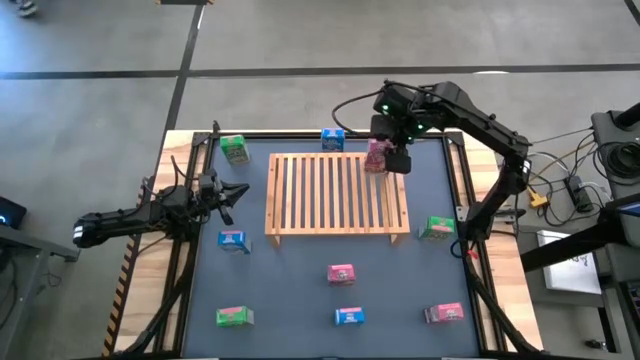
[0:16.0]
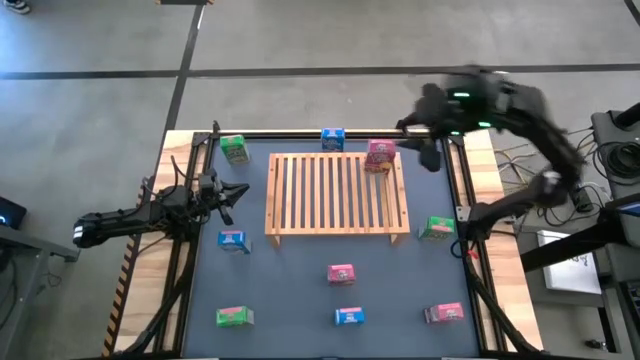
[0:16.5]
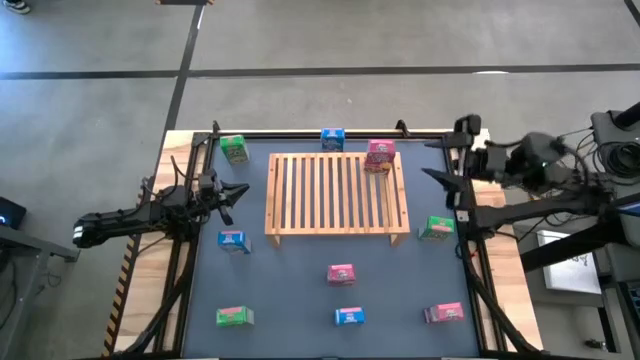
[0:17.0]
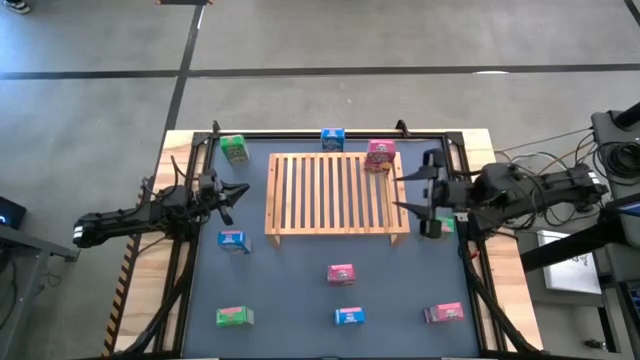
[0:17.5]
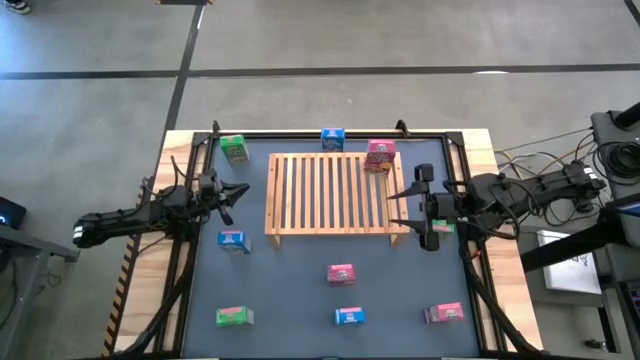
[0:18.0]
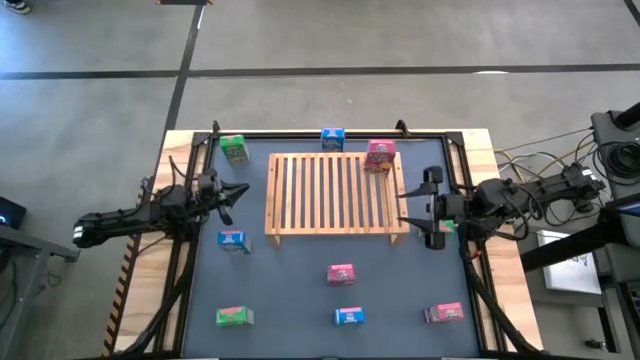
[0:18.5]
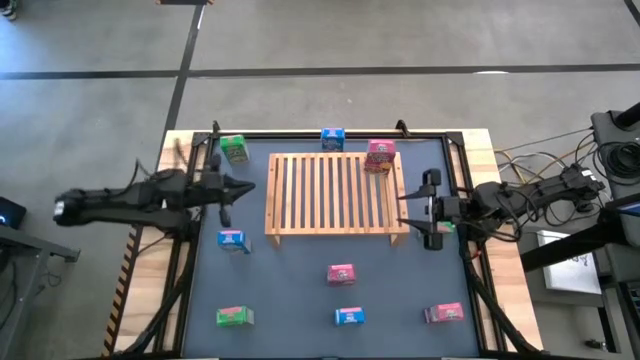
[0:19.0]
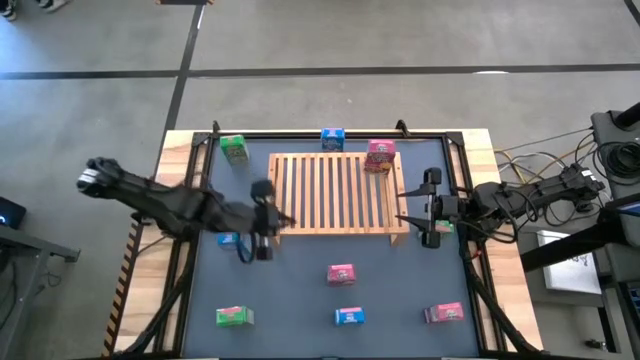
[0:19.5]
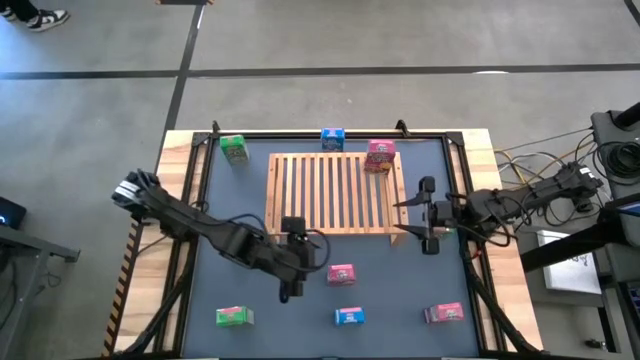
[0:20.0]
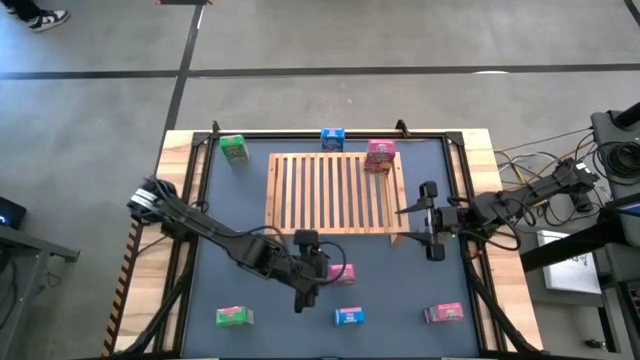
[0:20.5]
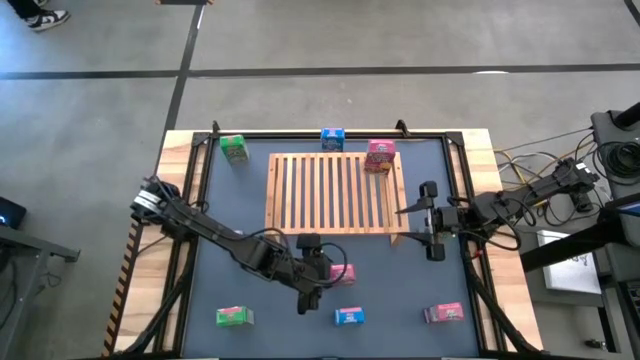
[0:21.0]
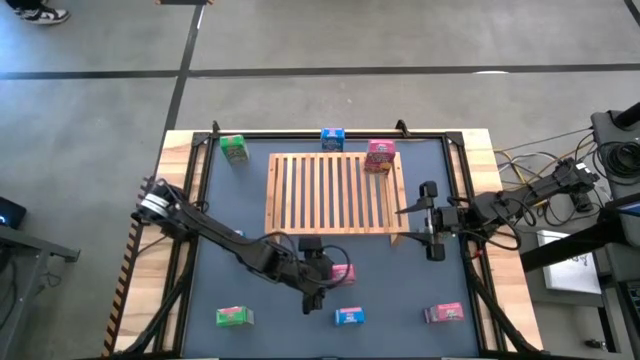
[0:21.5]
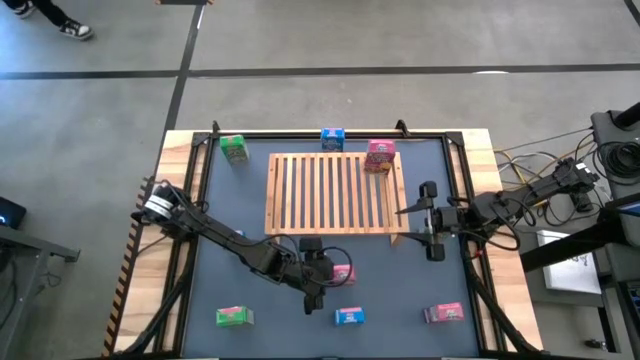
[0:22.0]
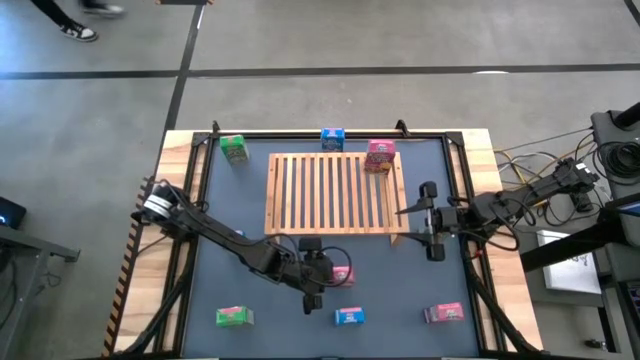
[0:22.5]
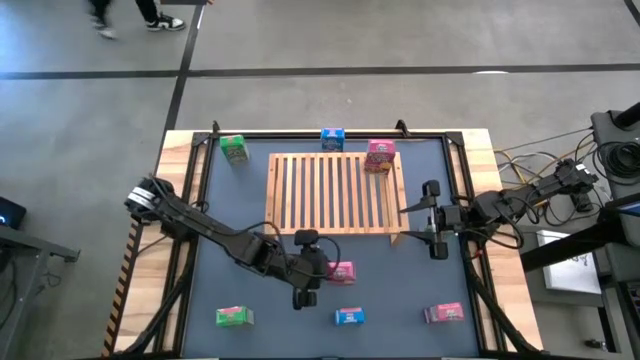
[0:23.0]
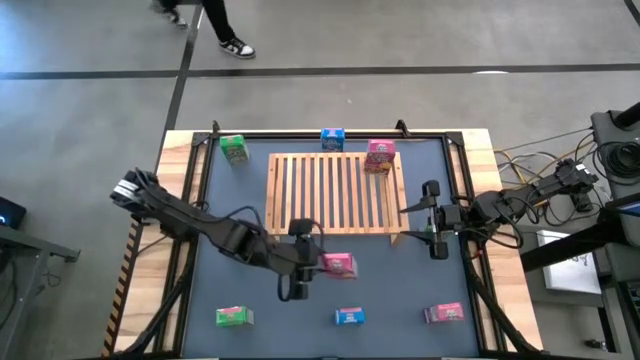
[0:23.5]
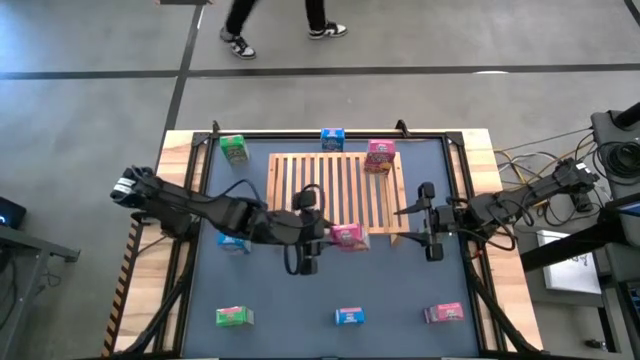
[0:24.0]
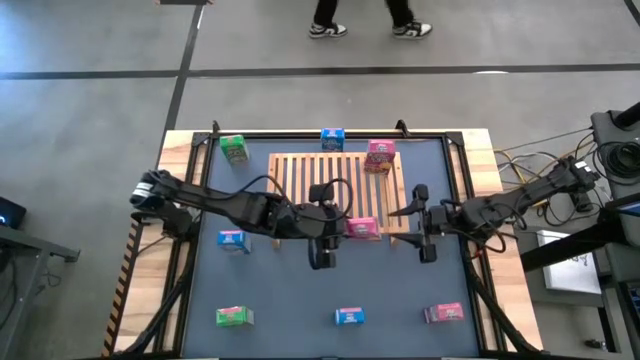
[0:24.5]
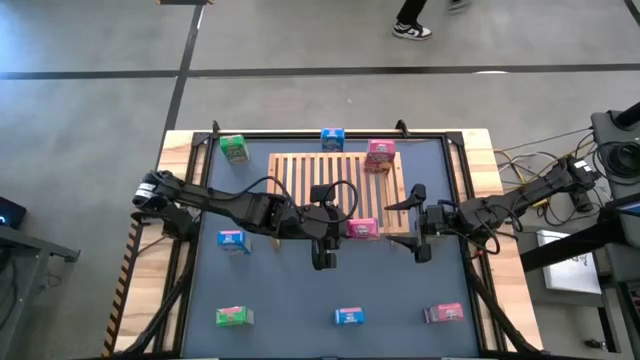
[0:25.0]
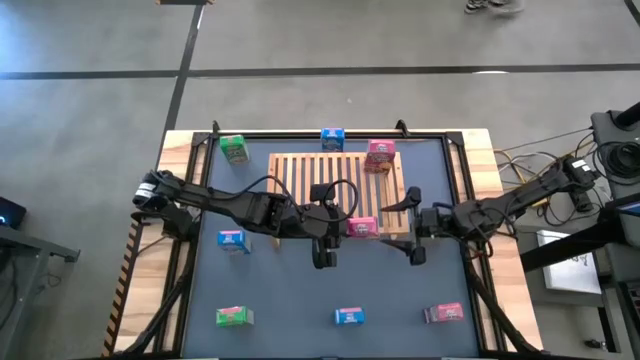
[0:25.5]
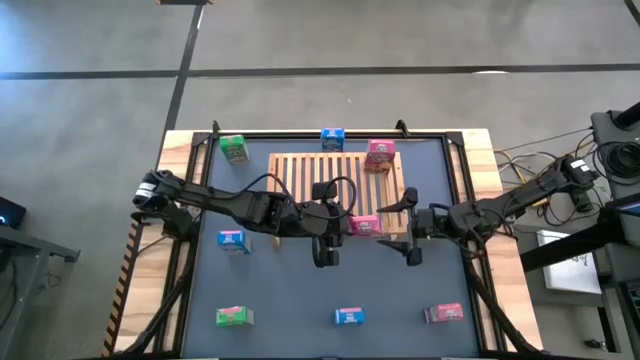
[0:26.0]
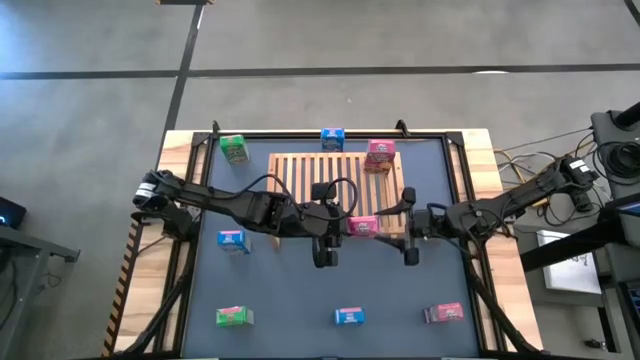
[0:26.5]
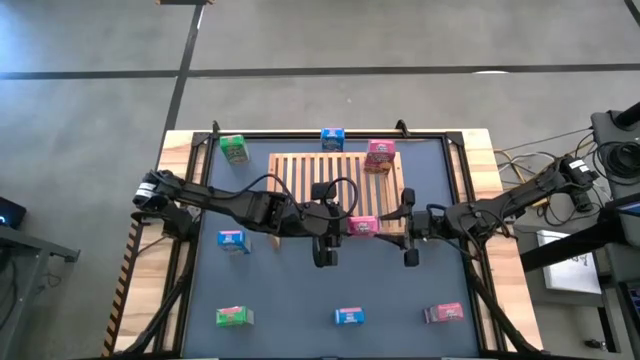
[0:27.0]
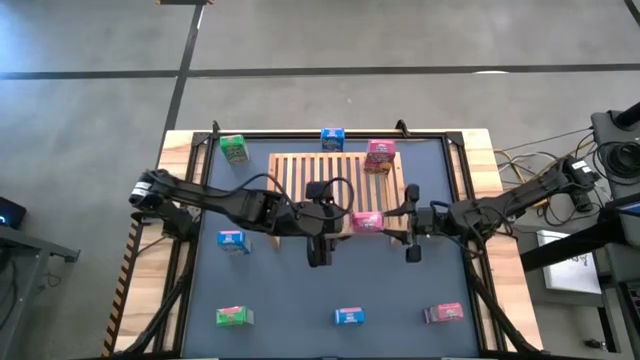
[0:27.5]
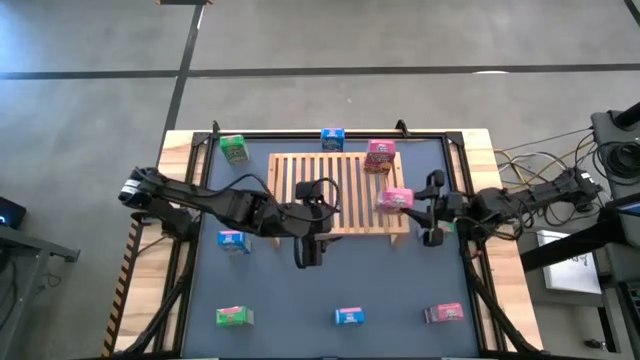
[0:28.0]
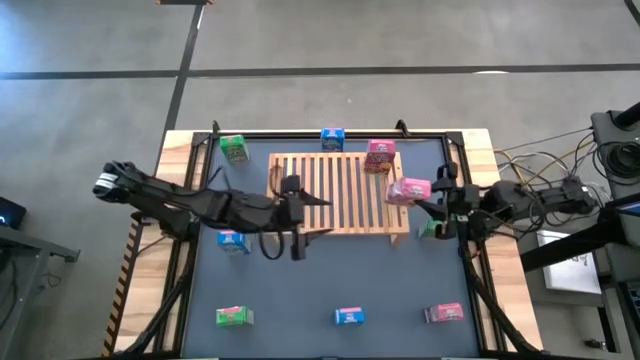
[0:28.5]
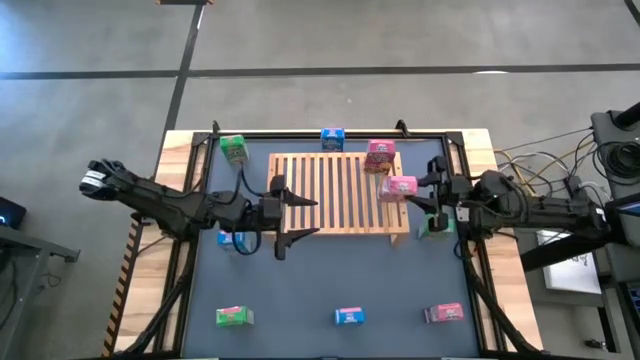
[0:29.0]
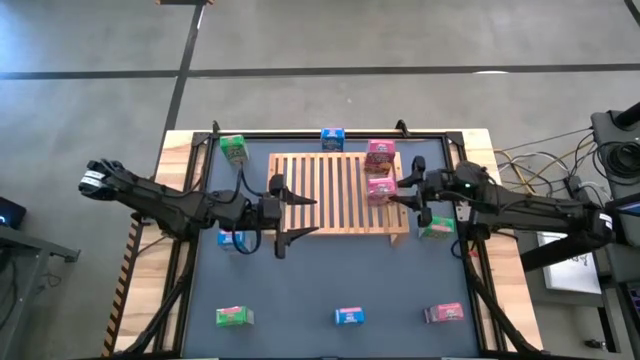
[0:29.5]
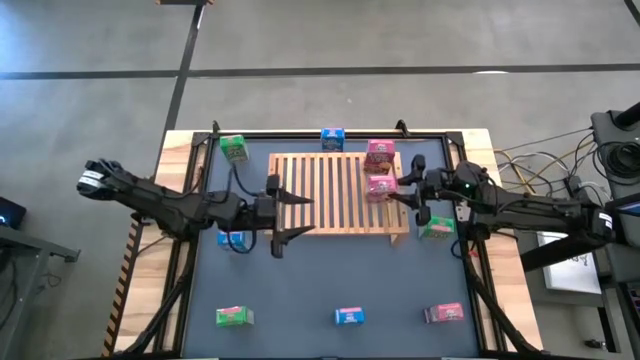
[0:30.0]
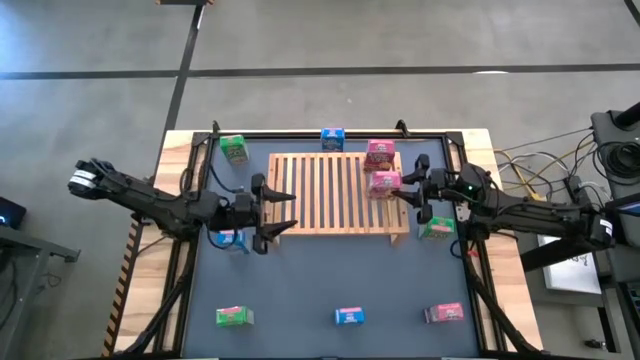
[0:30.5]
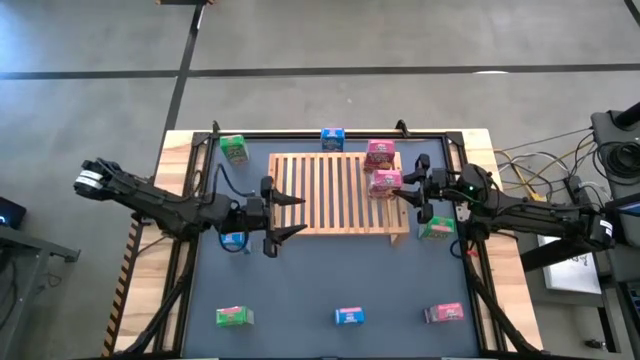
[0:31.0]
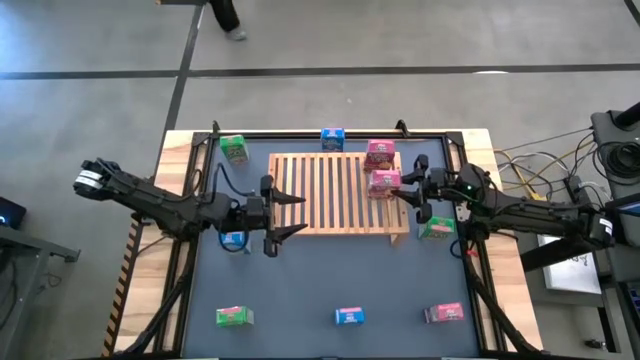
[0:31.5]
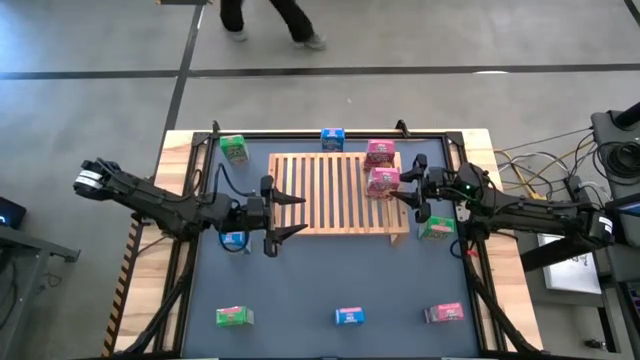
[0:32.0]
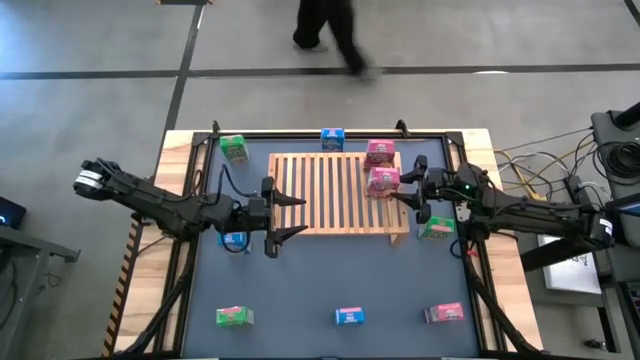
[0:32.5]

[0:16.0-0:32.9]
Task: Stack cereal on shelf
Put the top pink cereal box on the shelf aligned with the other pink cereal box

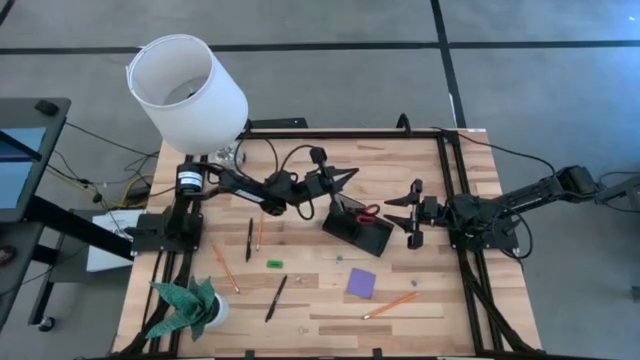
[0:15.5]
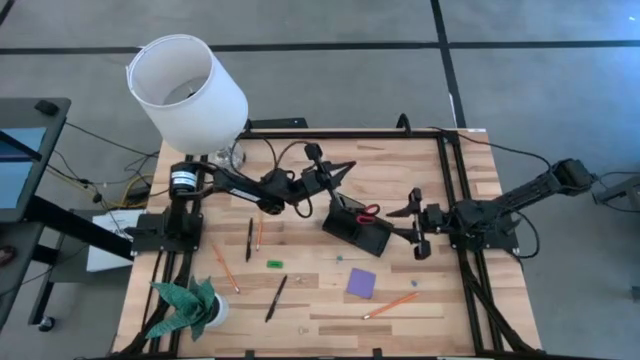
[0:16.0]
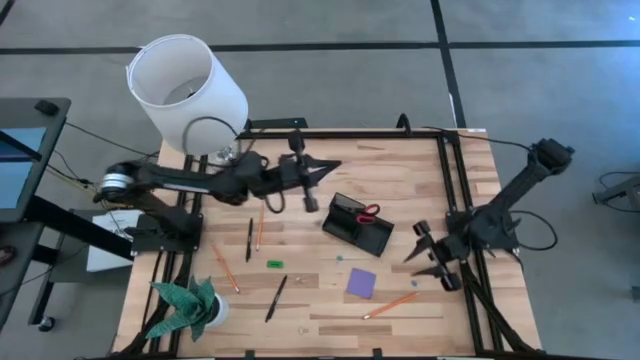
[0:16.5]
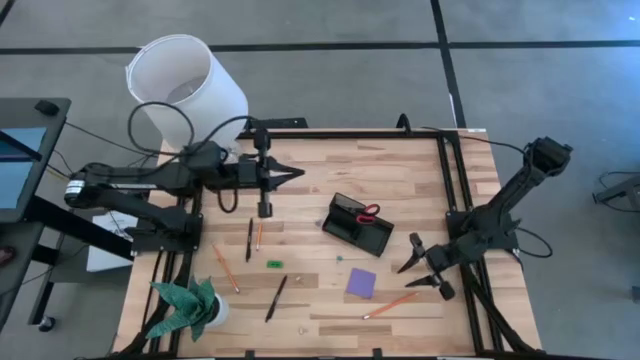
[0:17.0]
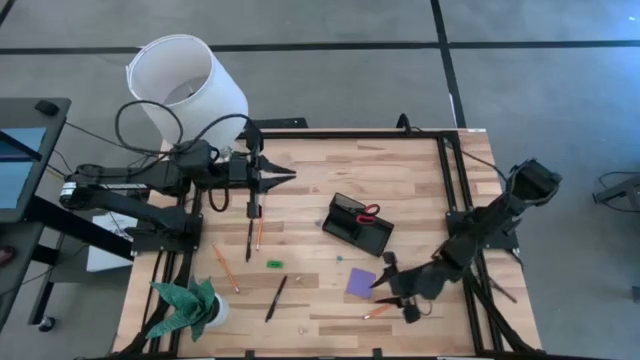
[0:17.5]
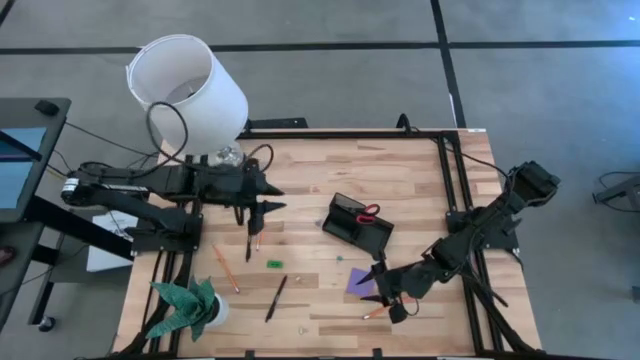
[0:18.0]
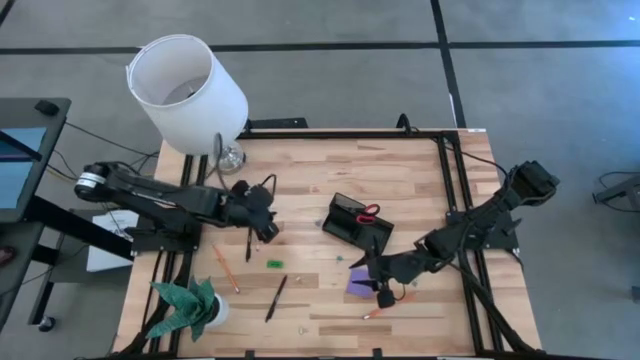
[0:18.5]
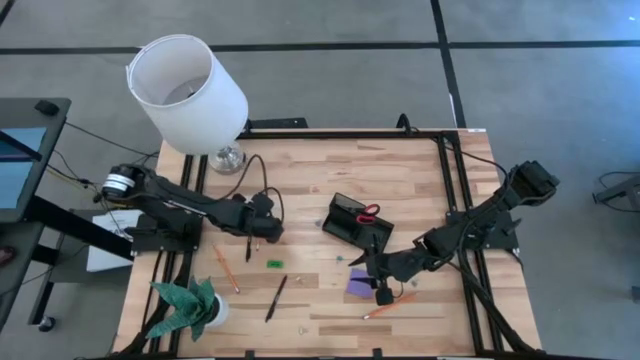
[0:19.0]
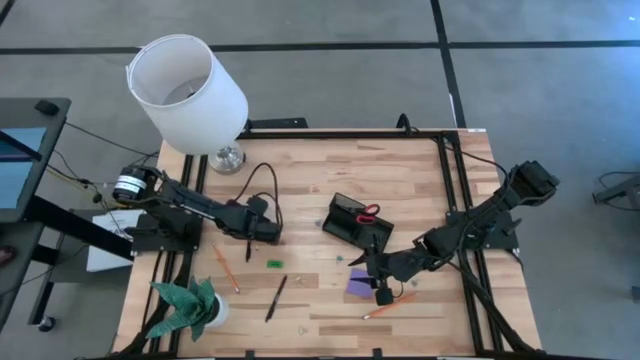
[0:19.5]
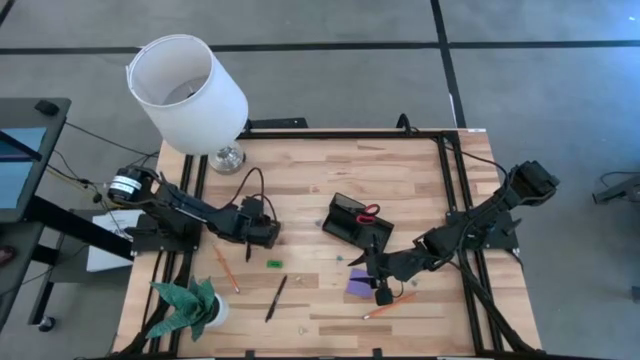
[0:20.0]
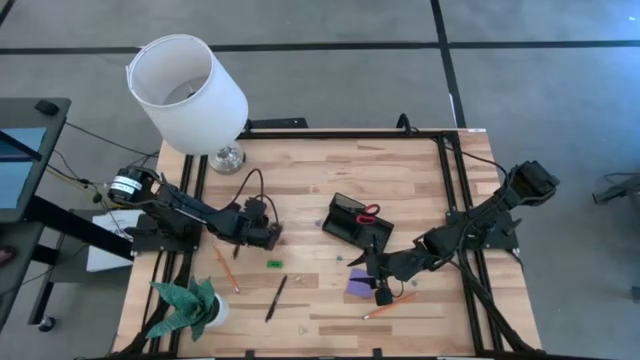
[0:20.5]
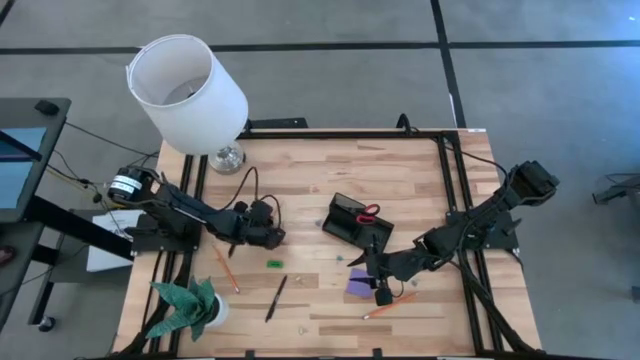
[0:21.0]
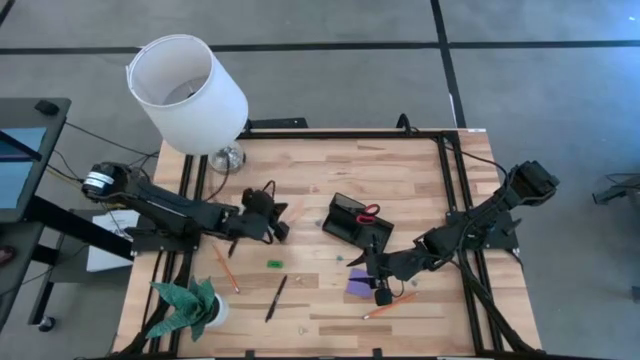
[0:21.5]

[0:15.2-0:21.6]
Task: Pick and place office supplies into organizer
Put the top orange pencil into the black desk organizer
